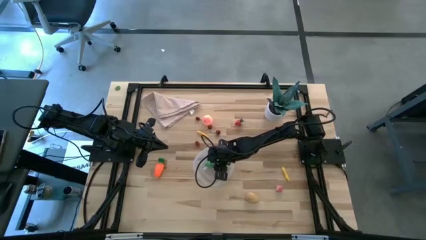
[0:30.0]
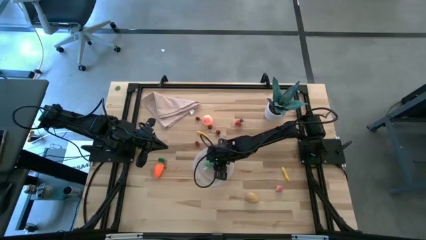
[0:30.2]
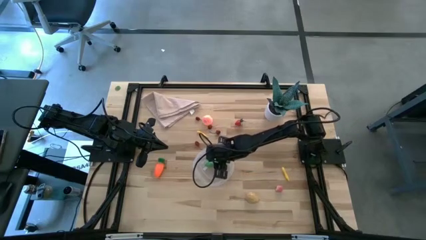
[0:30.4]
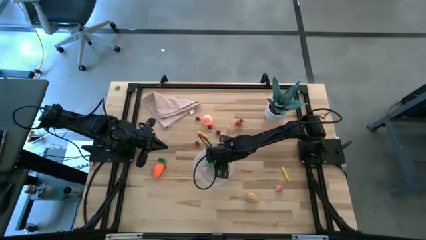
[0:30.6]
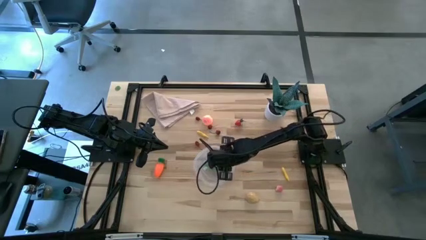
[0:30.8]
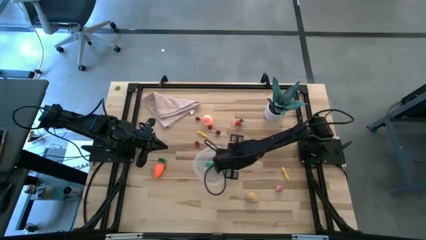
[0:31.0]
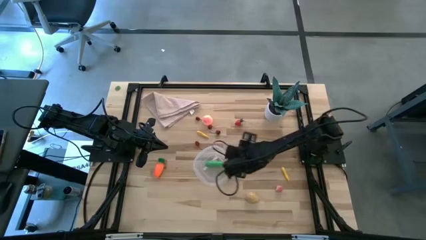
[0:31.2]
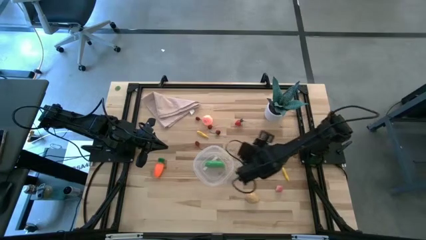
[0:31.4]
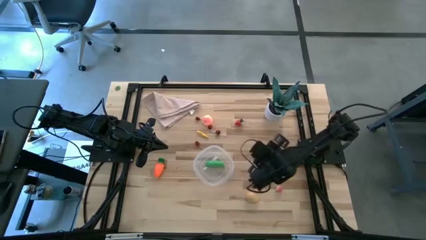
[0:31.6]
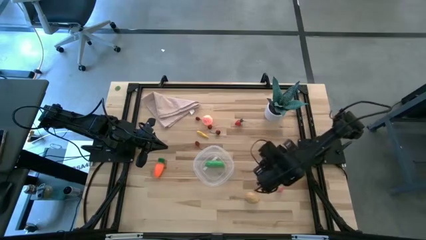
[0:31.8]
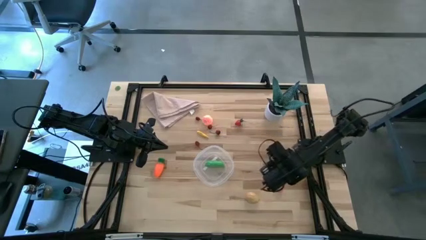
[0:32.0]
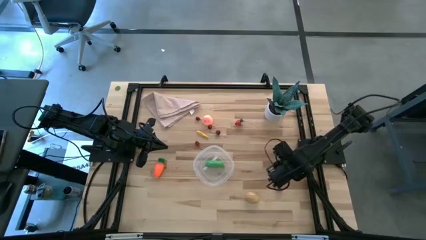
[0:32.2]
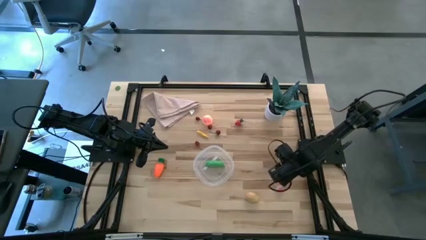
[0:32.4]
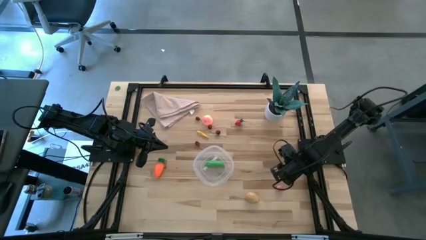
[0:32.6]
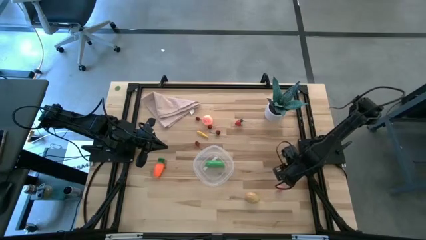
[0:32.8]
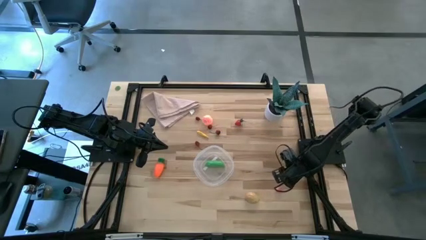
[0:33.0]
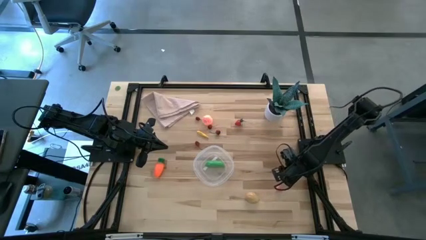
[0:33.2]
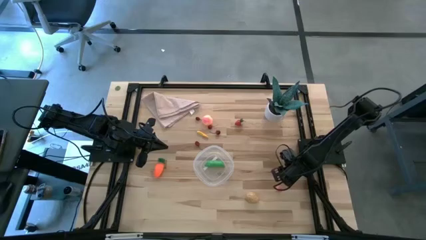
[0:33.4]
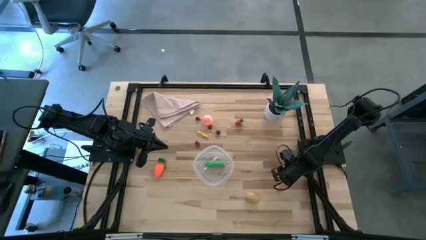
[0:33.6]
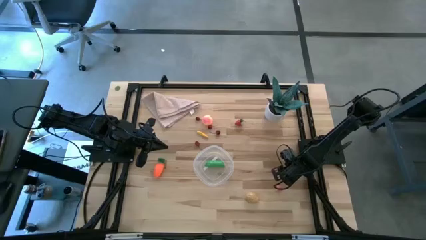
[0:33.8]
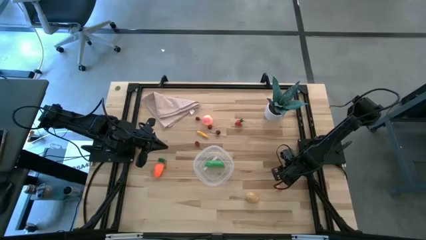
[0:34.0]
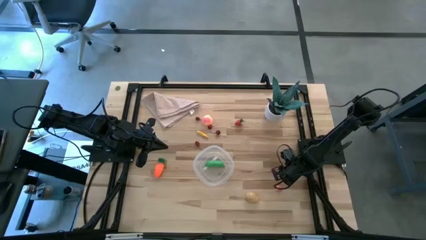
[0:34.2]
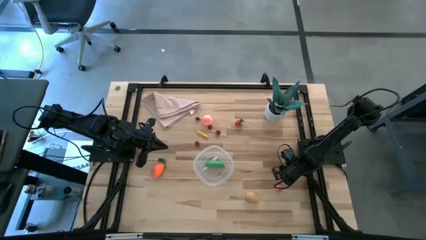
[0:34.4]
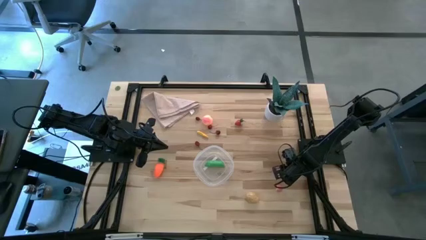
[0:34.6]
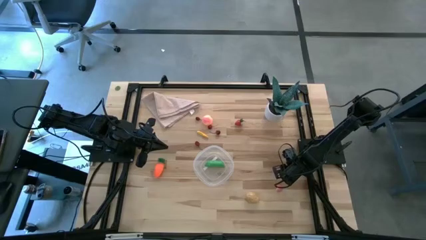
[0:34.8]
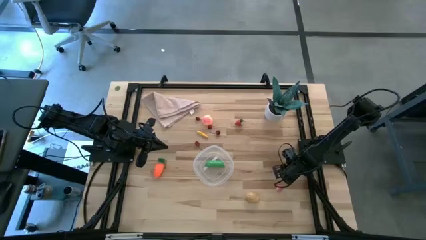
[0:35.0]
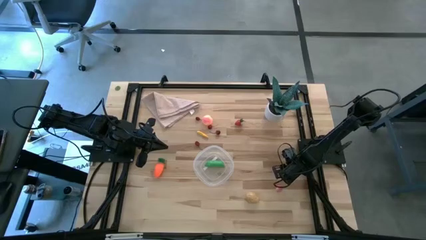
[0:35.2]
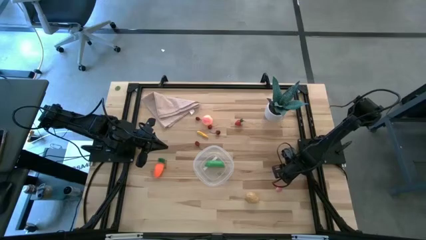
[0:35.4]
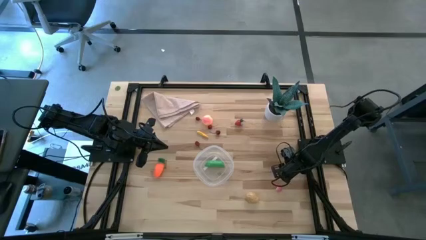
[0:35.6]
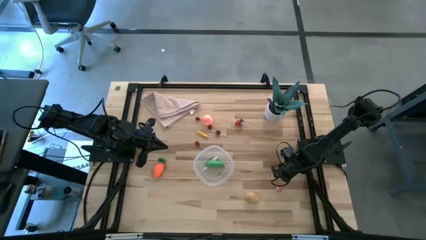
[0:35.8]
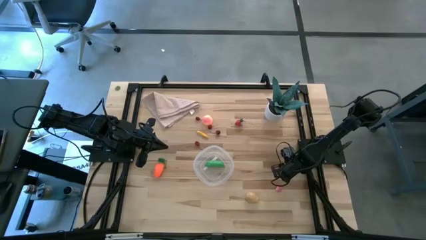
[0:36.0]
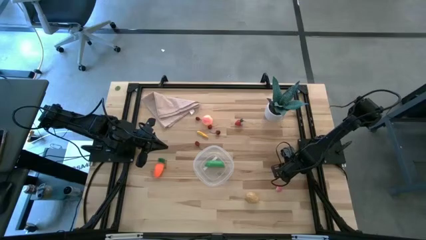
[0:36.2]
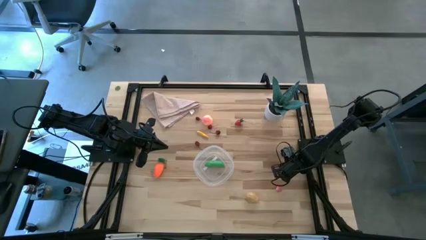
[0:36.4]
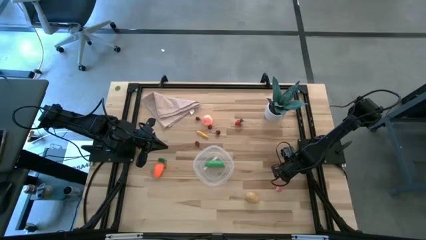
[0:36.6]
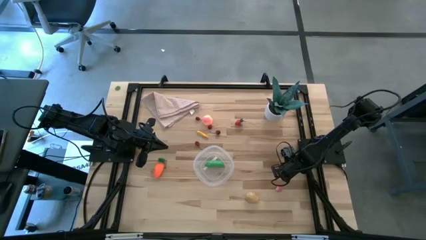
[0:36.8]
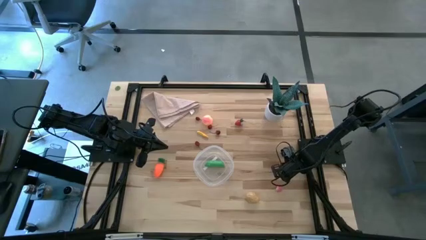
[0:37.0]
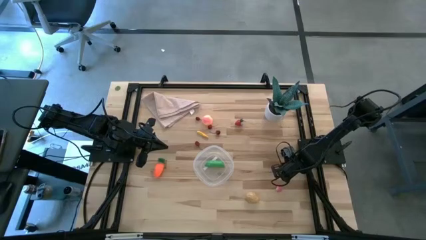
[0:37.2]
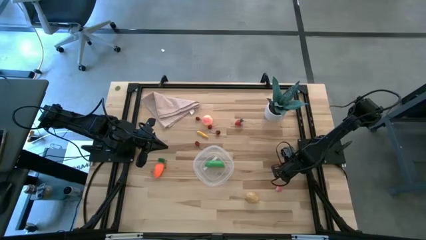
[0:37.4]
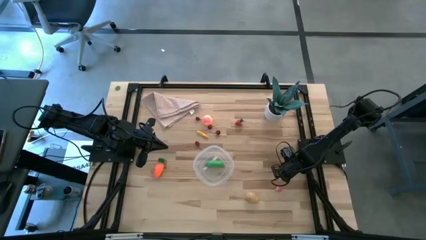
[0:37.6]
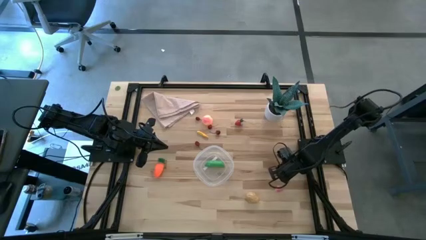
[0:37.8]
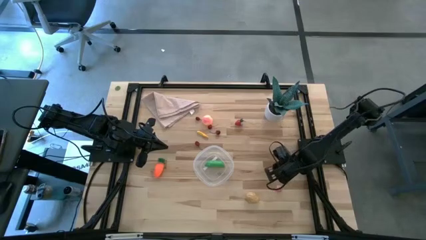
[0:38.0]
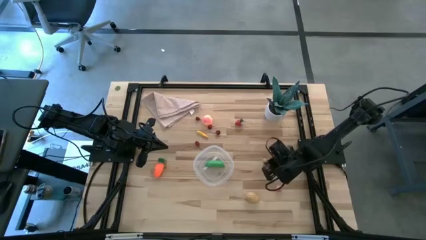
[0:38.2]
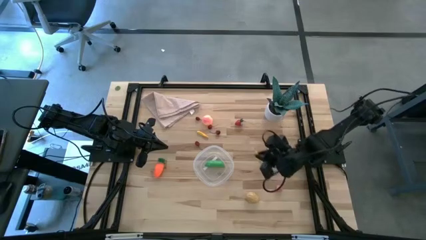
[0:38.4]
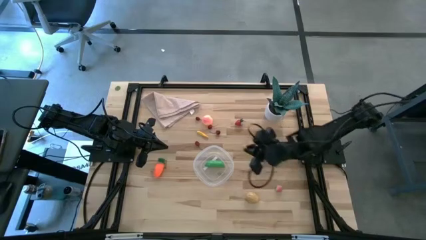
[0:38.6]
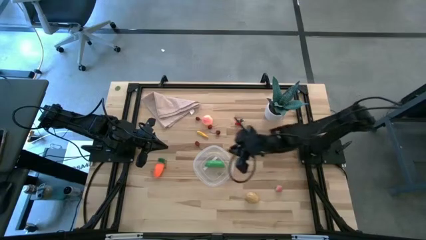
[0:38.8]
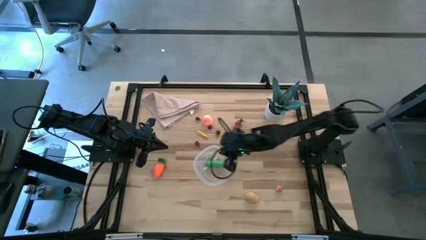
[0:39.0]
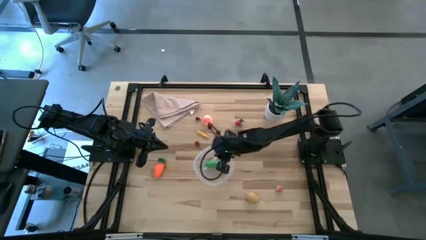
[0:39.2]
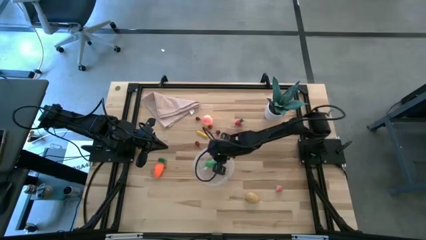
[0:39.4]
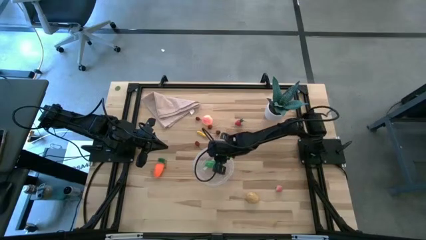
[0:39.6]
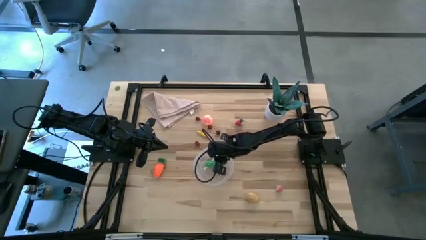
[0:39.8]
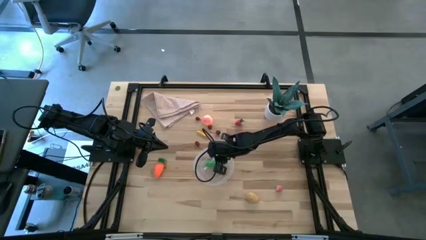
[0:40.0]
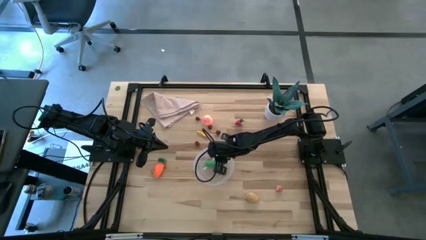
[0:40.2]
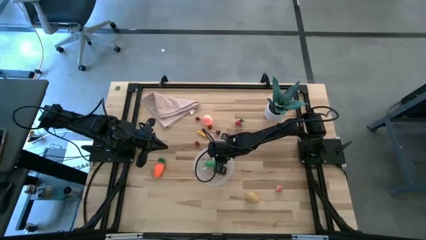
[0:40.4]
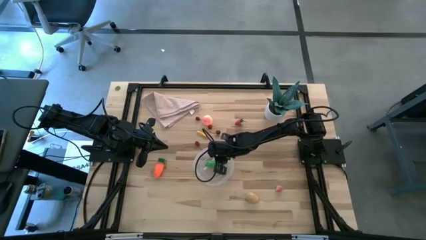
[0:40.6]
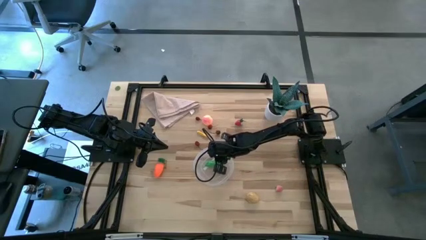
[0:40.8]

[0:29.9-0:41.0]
Task: Pick and placing Produce into tupperware
Put the corn into the transparent bin

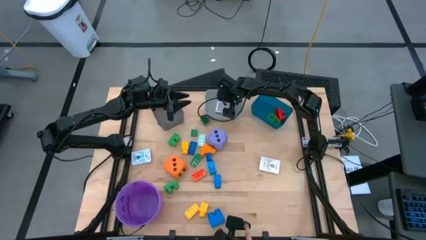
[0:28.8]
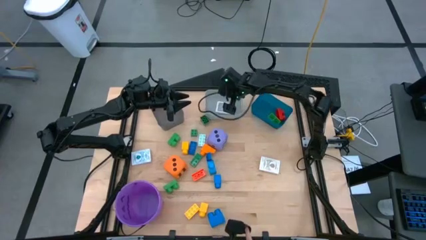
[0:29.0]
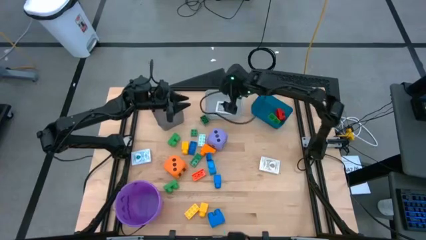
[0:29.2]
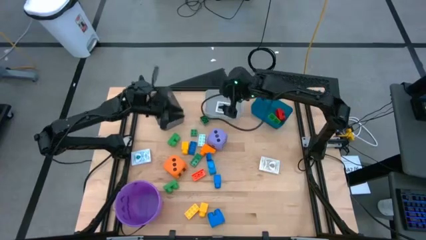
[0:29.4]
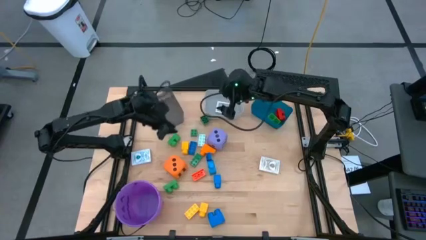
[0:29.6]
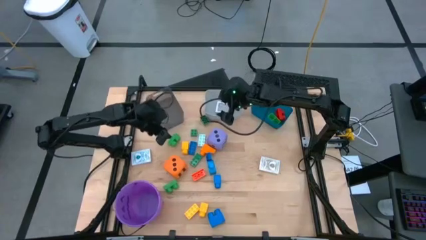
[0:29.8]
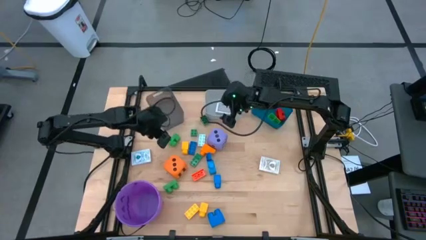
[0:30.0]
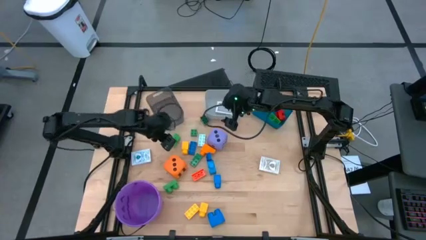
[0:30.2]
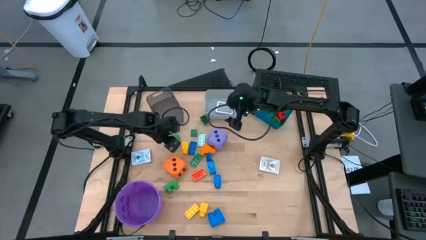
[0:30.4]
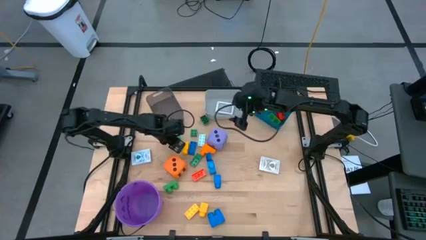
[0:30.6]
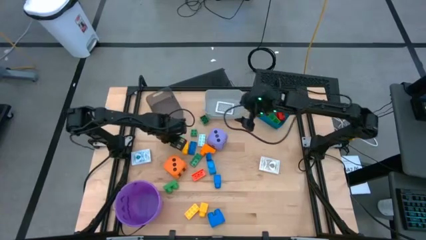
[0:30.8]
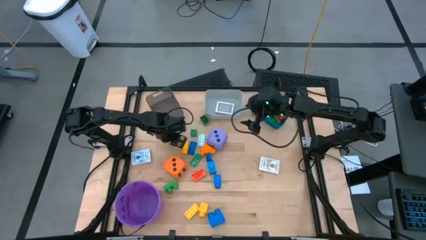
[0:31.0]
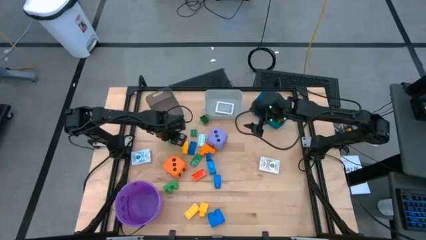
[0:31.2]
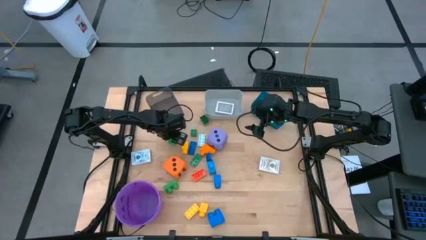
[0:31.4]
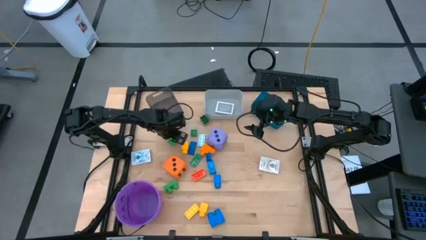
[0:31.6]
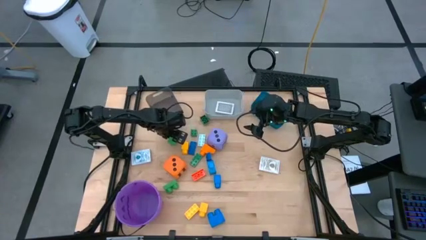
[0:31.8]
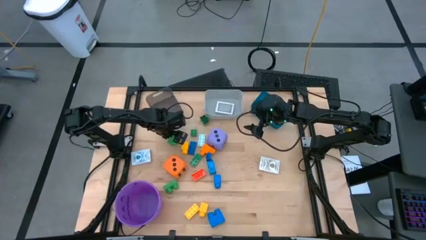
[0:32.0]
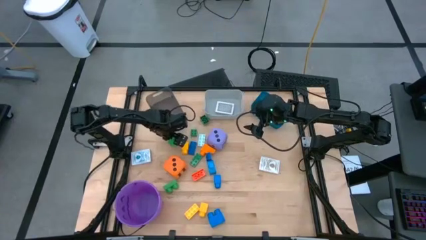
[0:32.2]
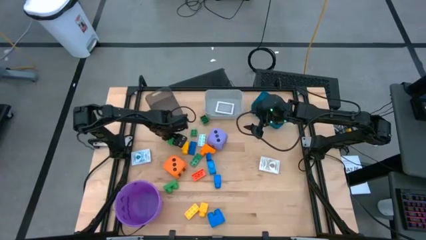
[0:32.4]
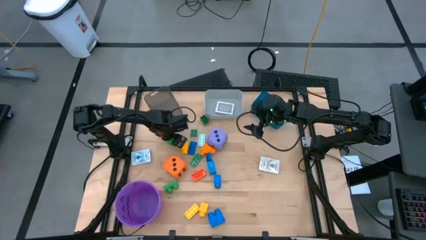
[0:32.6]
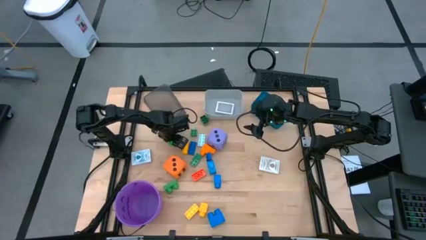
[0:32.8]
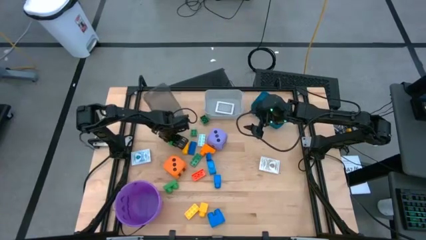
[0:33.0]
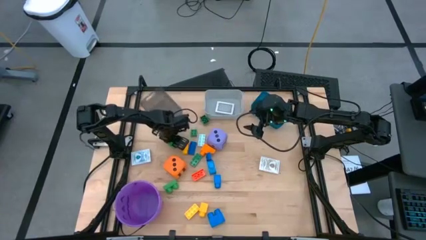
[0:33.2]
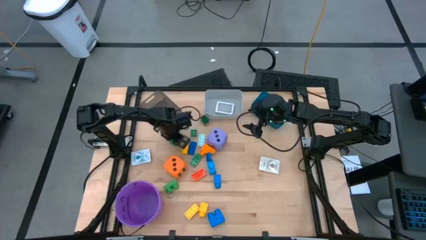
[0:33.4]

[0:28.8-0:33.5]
Task: Pick & Place Toys
Put the green game piece into the blue bin
